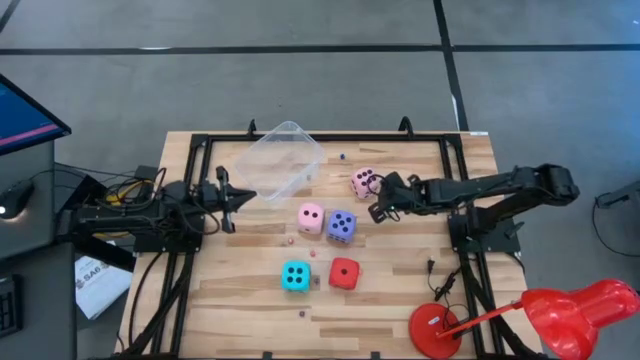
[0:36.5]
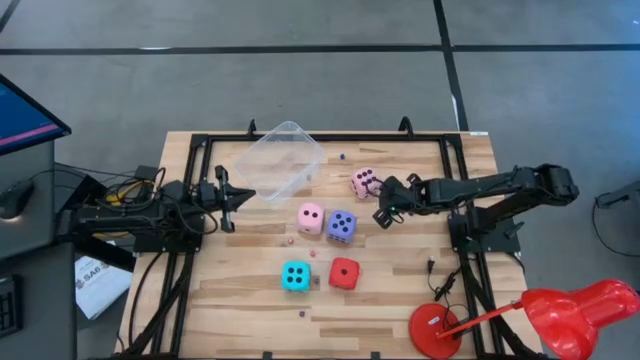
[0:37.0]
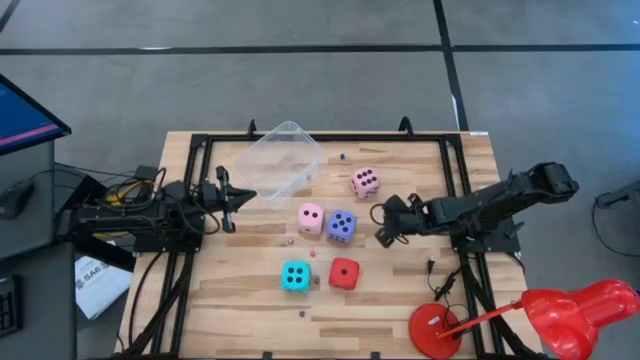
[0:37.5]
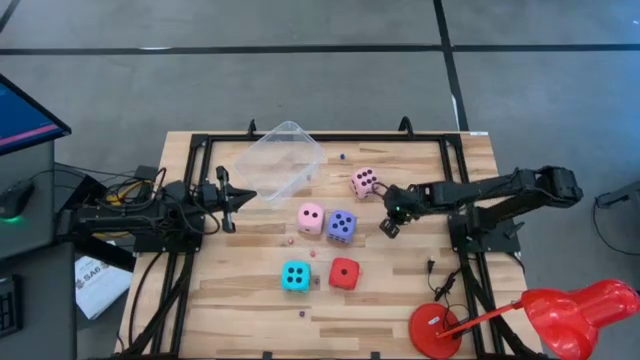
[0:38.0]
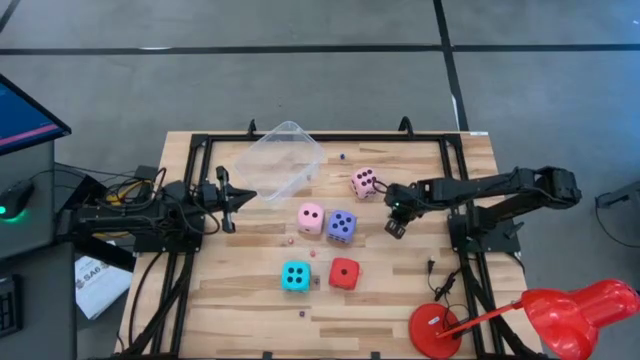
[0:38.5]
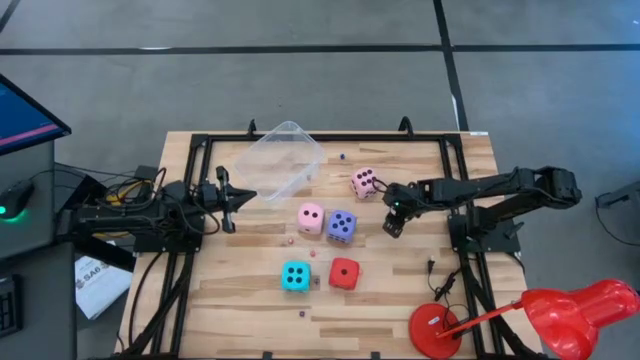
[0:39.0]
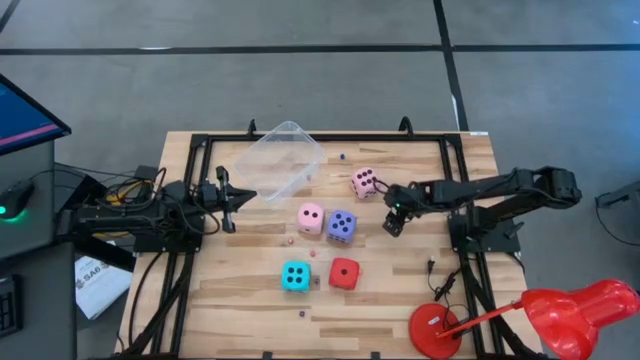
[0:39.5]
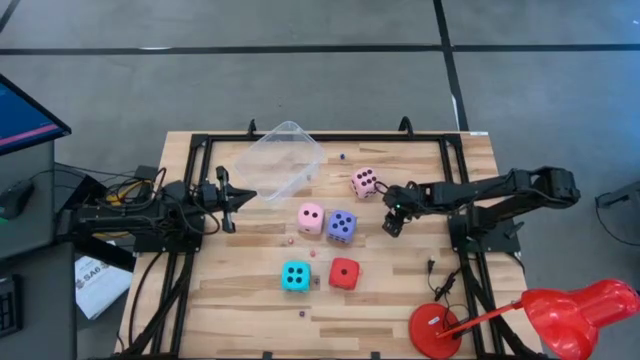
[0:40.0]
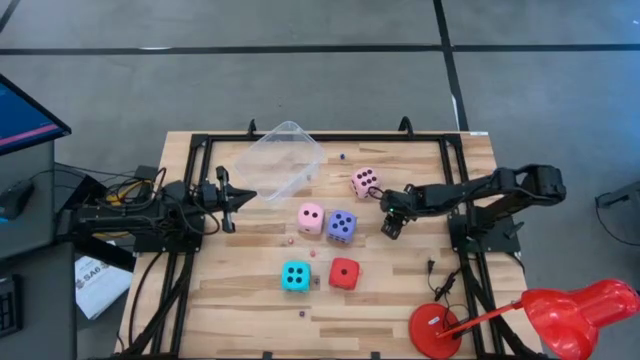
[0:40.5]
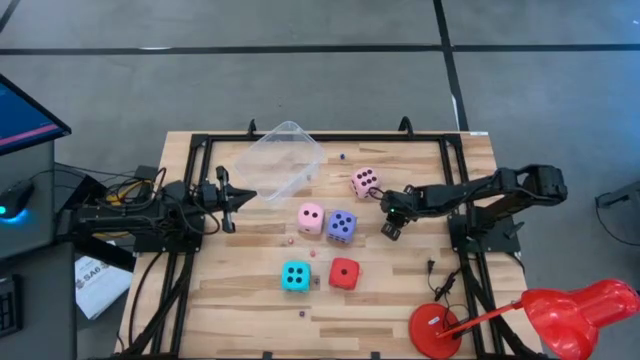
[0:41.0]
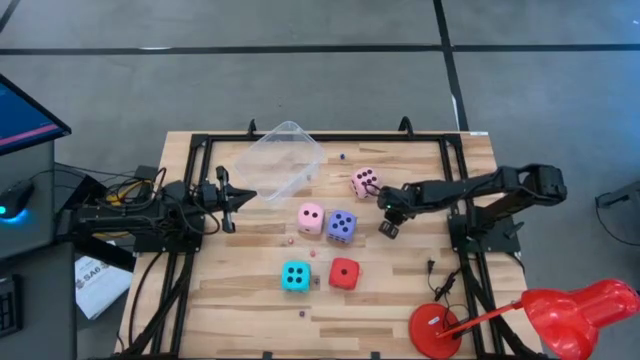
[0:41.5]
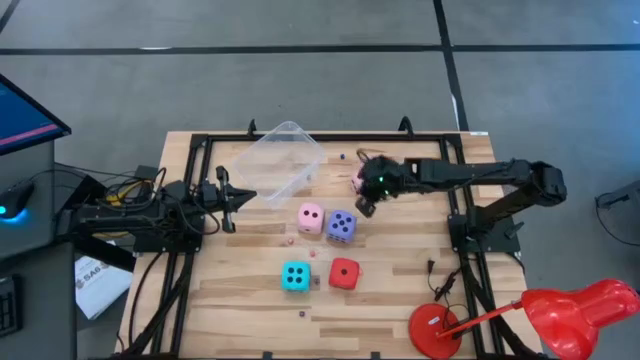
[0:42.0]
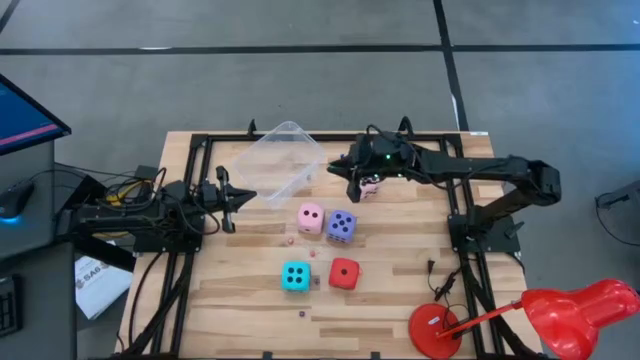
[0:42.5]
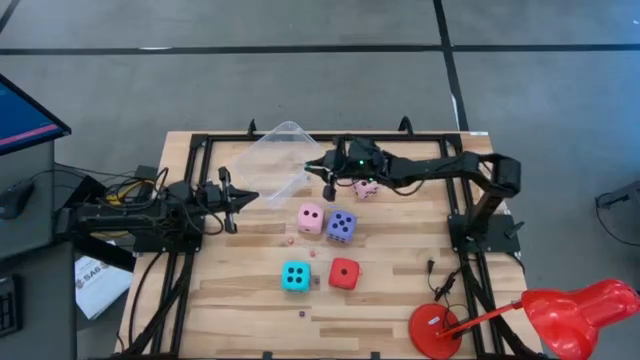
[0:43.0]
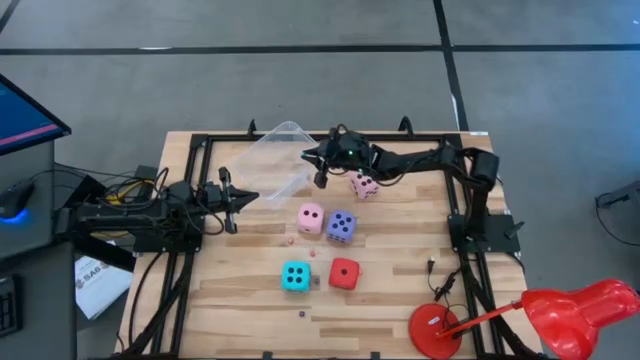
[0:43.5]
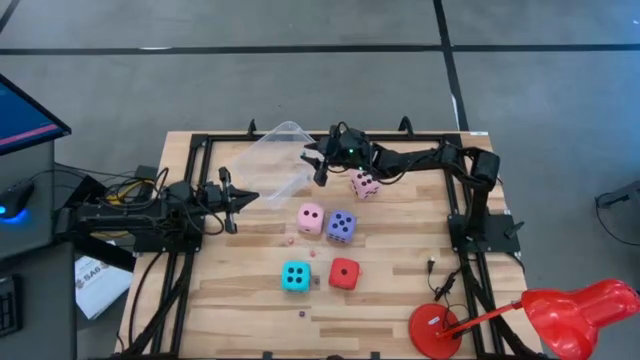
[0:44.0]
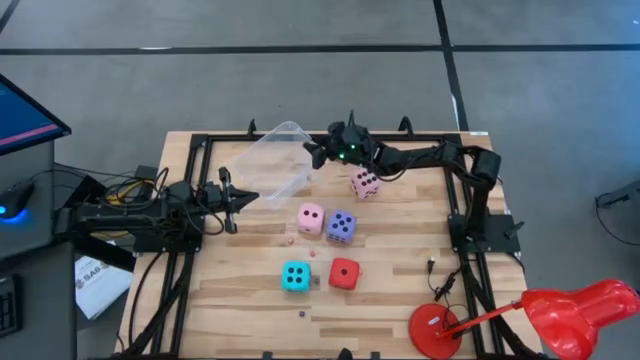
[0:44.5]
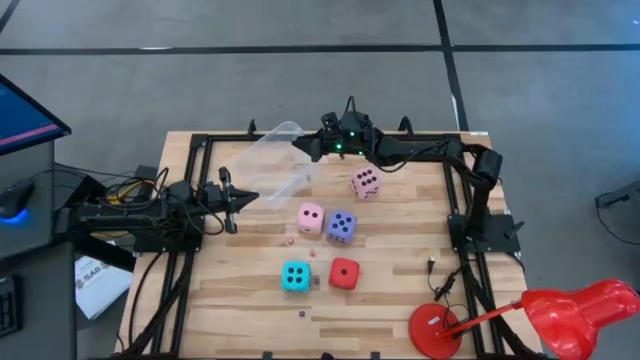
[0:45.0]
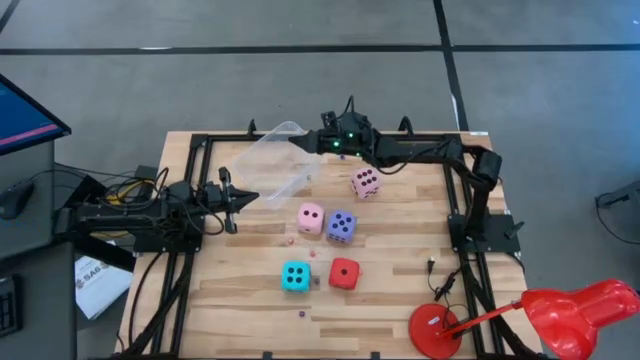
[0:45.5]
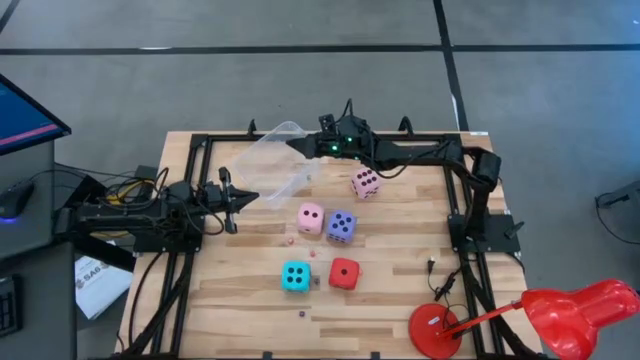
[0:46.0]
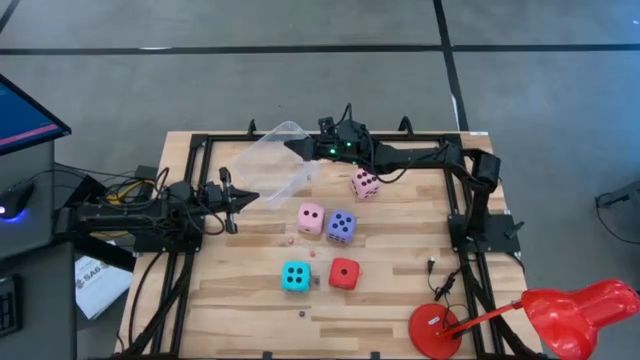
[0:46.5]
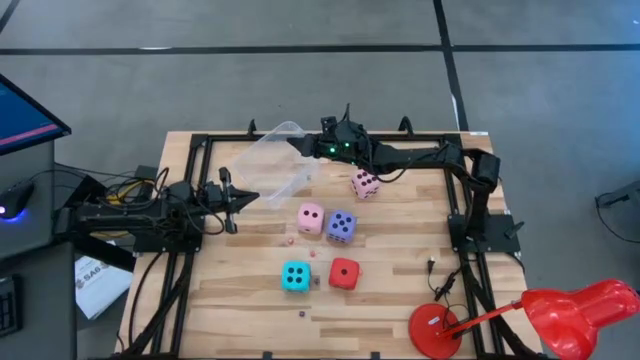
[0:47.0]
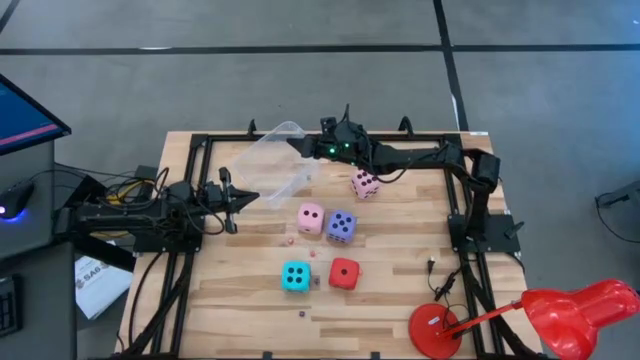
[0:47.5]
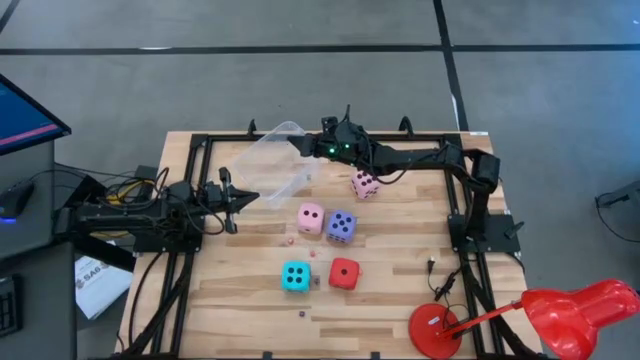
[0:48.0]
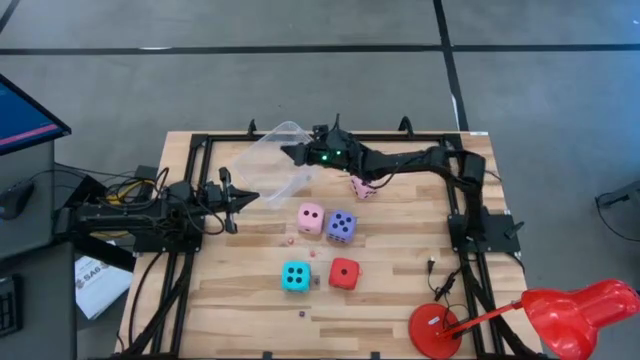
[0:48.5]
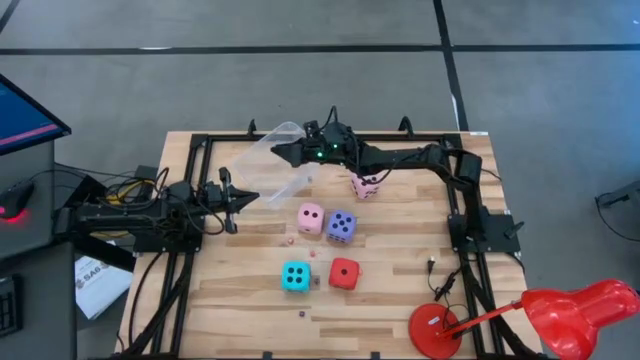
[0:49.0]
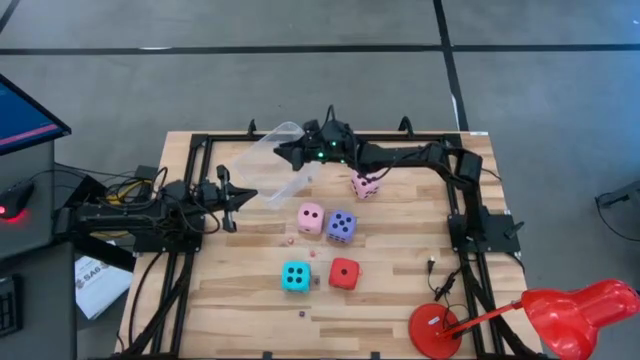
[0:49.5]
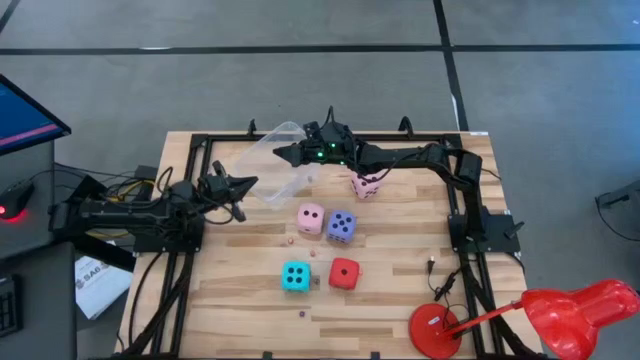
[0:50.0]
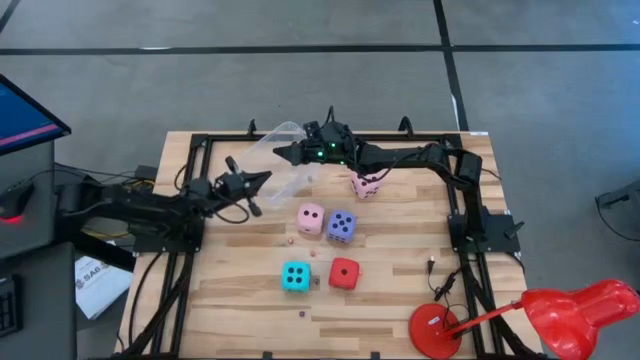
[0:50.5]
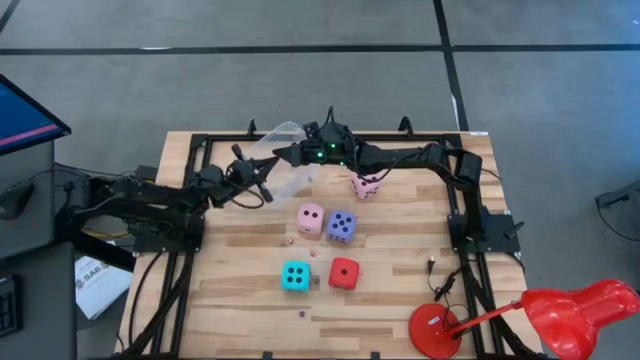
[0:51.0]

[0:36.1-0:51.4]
Task: Pick & Place Dice
Put the small green dice into the transparent container

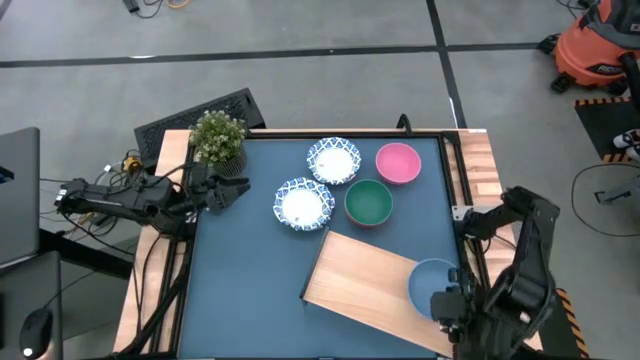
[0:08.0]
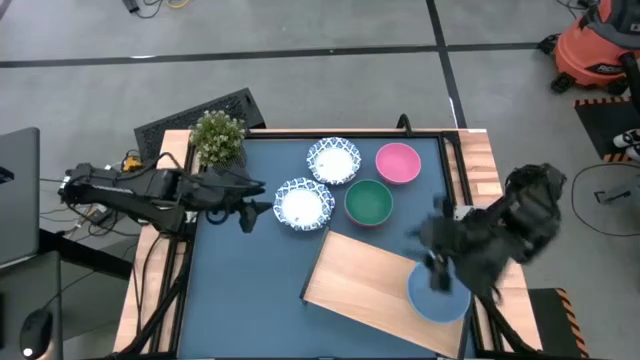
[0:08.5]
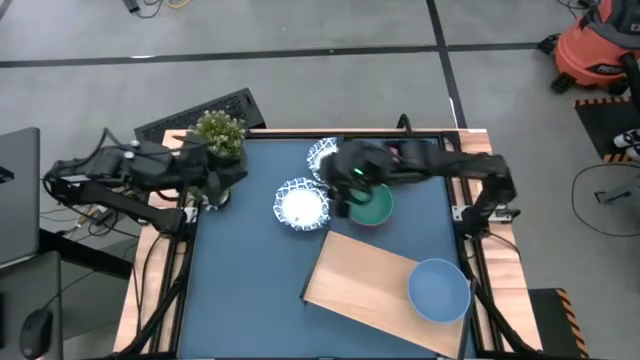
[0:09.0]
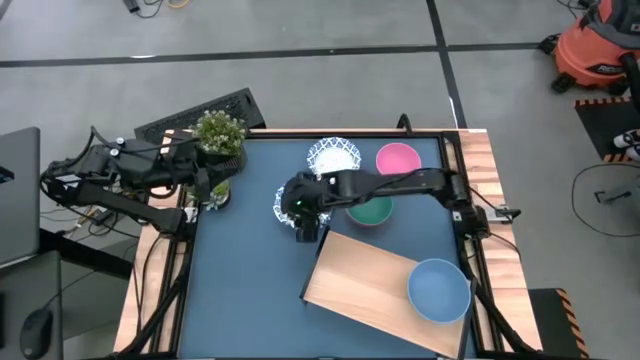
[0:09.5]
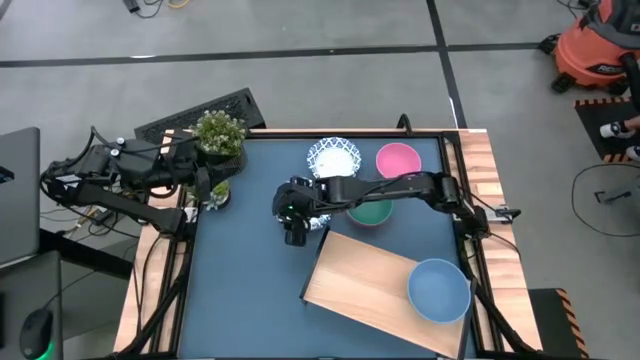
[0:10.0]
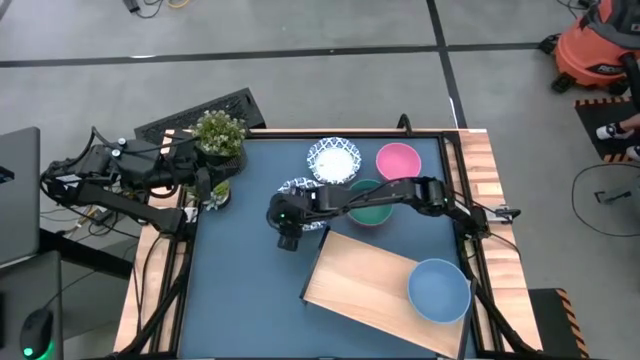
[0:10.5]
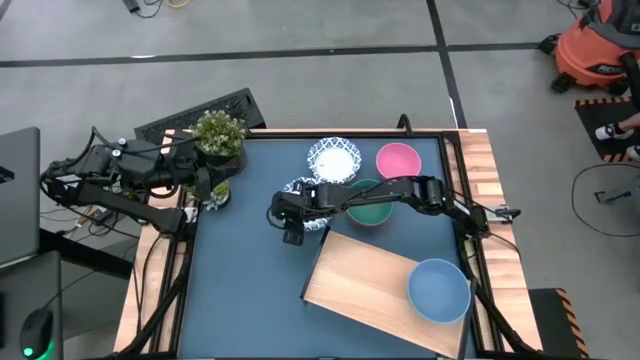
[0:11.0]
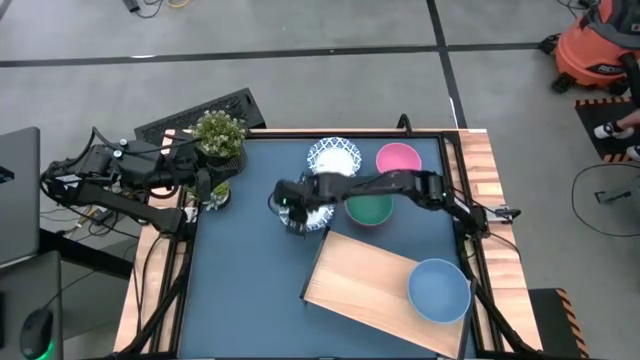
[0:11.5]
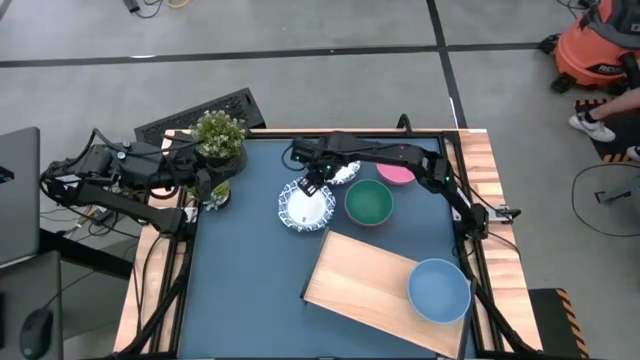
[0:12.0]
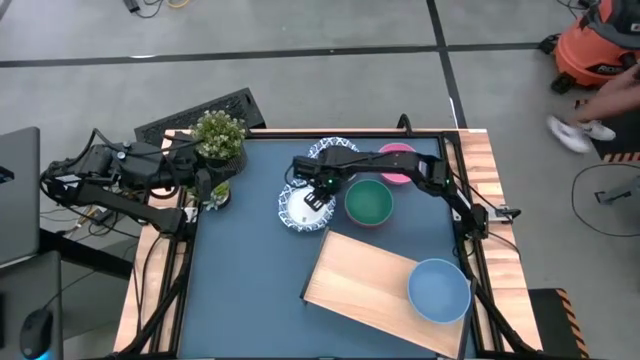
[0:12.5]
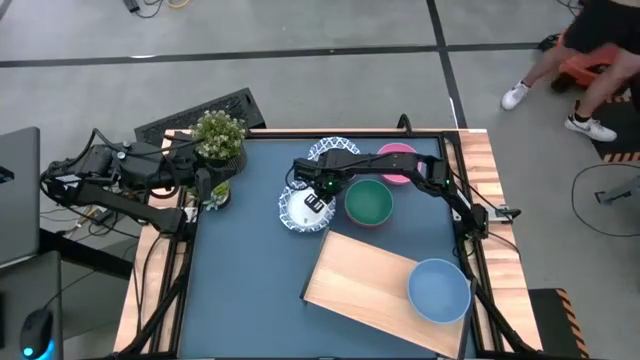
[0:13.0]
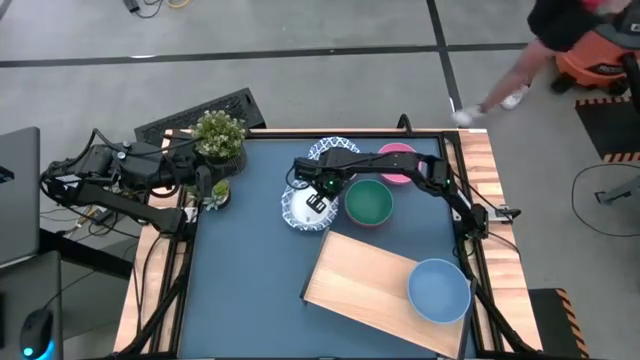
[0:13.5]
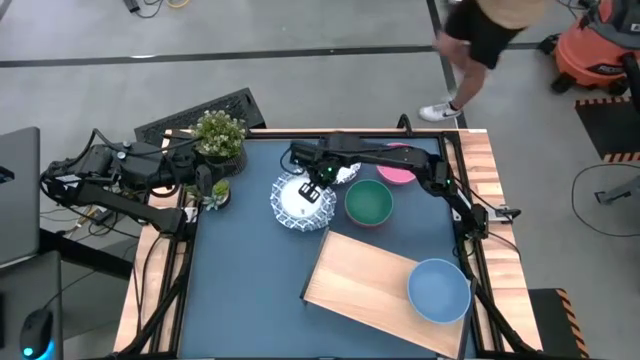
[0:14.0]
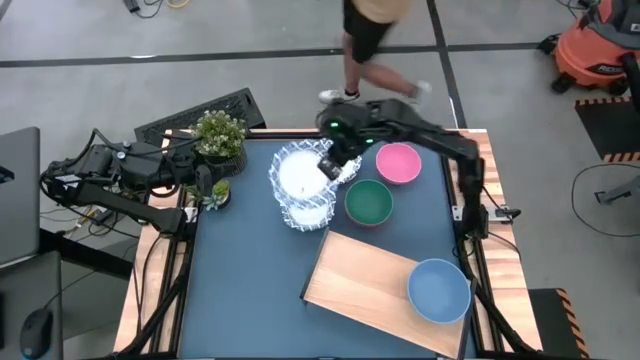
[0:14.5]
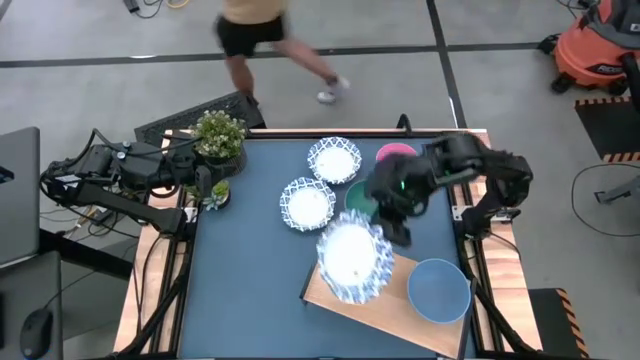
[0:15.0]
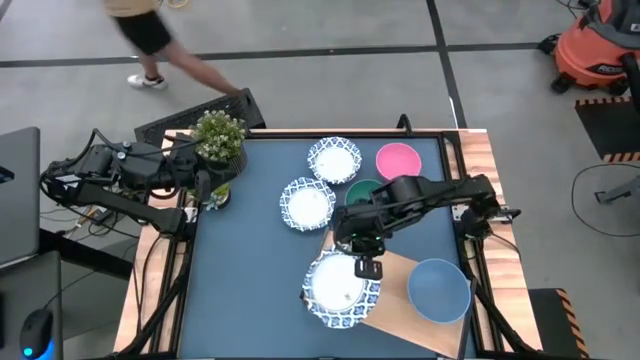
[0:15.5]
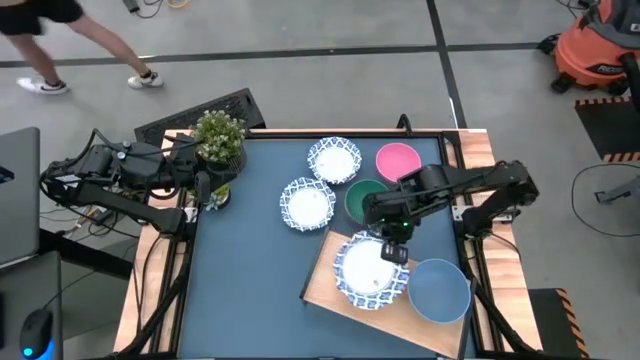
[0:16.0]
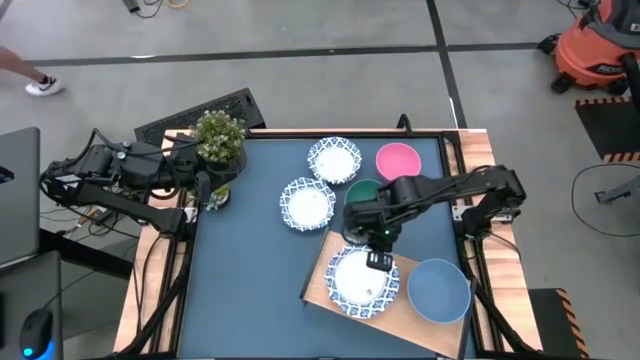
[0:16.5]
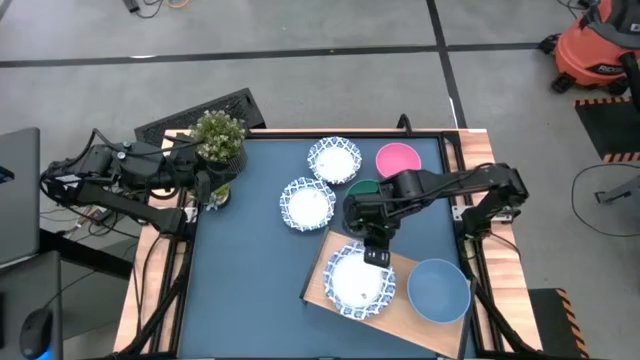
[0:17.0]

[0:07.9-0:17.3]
Task: Place and stack bowls onto a shelf
Put the white bowl on the shelf
